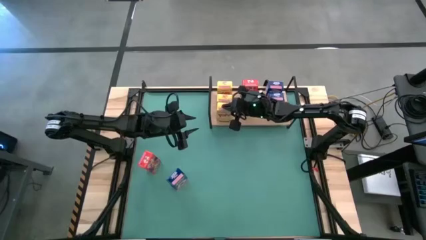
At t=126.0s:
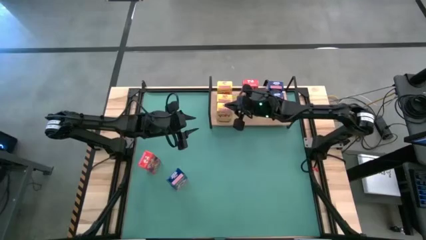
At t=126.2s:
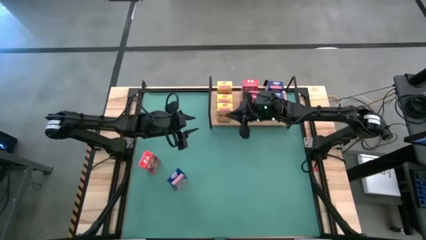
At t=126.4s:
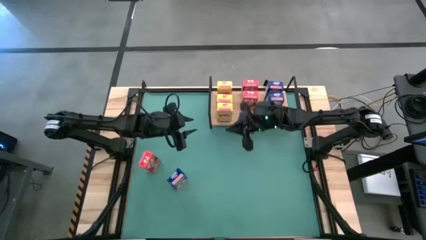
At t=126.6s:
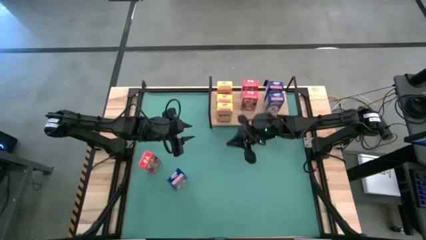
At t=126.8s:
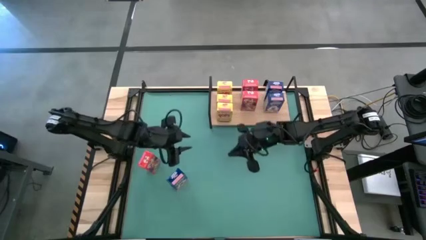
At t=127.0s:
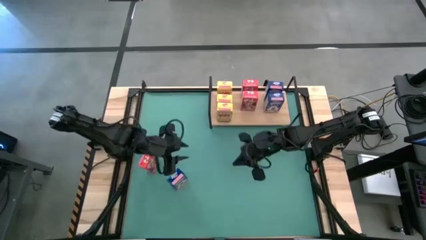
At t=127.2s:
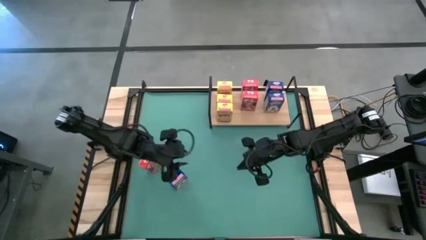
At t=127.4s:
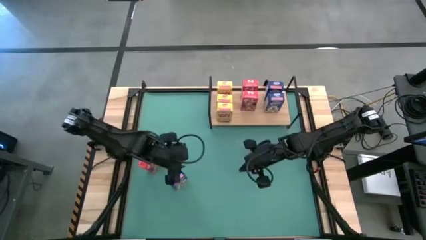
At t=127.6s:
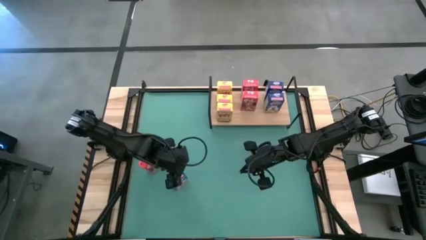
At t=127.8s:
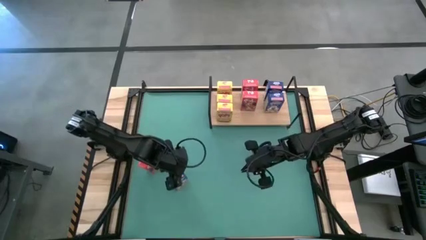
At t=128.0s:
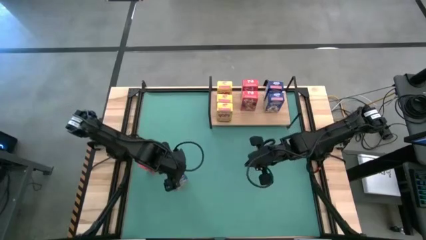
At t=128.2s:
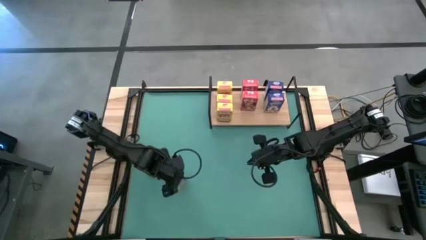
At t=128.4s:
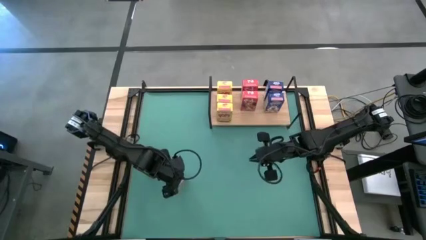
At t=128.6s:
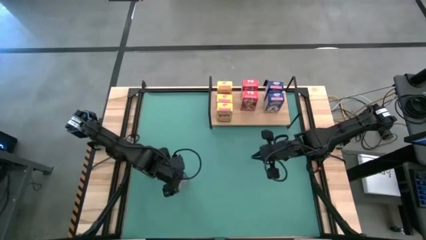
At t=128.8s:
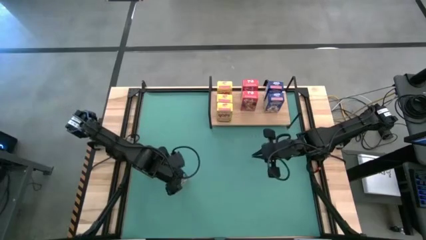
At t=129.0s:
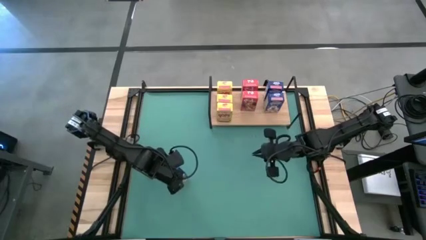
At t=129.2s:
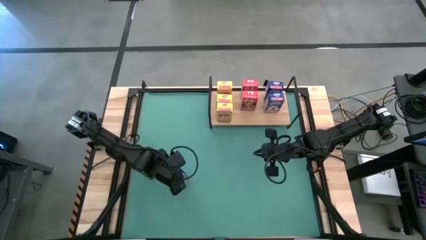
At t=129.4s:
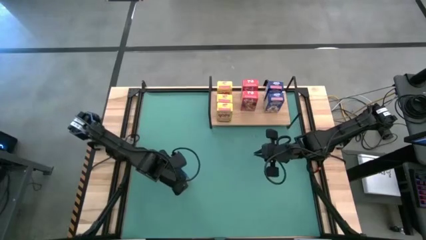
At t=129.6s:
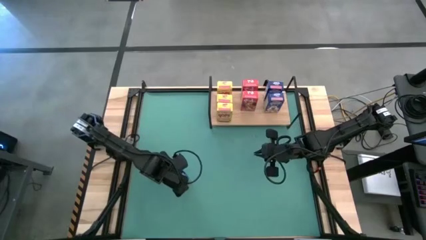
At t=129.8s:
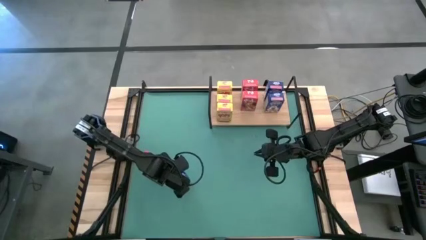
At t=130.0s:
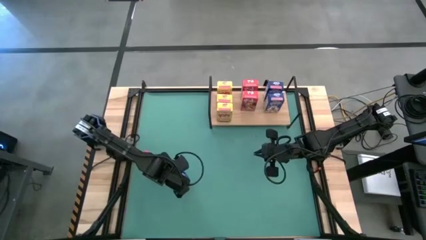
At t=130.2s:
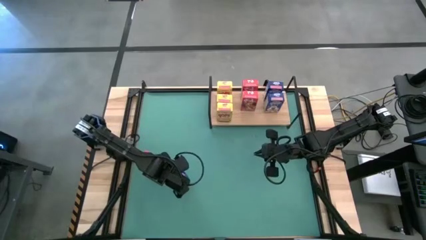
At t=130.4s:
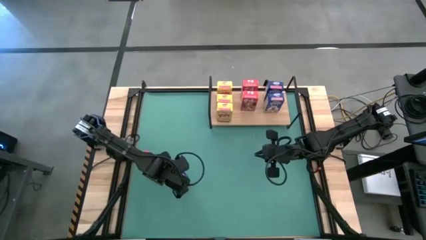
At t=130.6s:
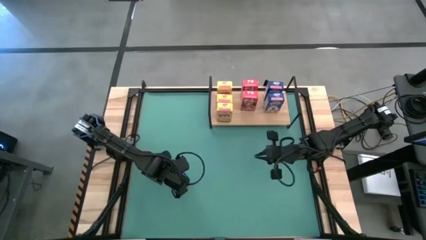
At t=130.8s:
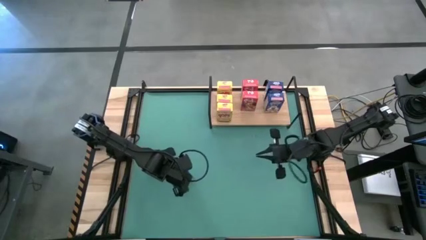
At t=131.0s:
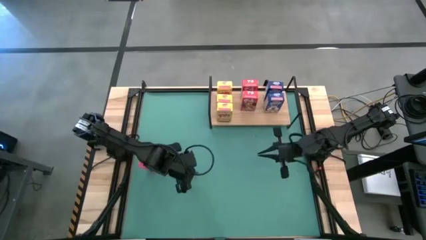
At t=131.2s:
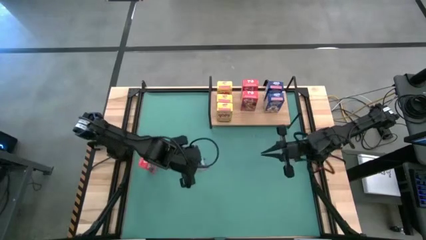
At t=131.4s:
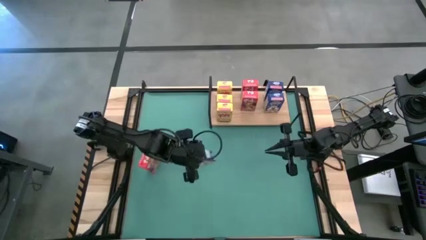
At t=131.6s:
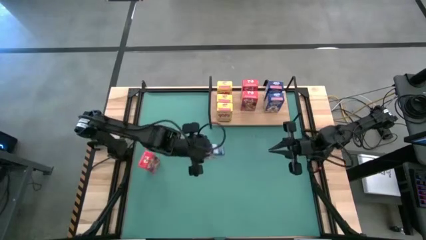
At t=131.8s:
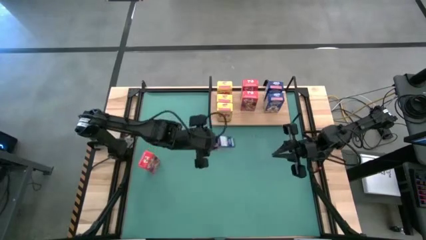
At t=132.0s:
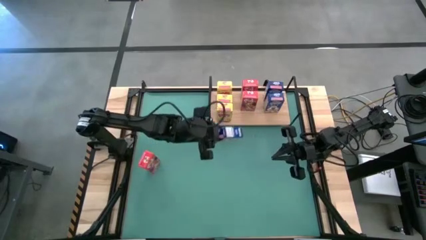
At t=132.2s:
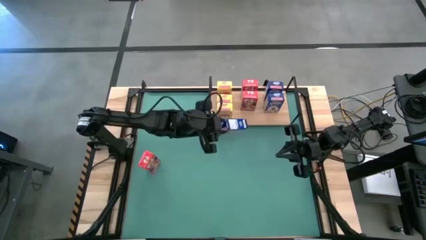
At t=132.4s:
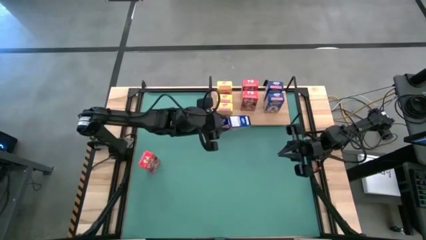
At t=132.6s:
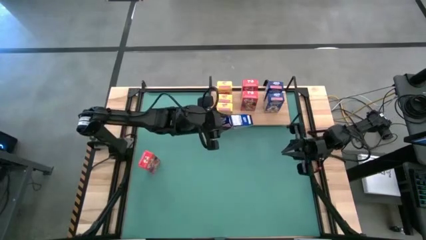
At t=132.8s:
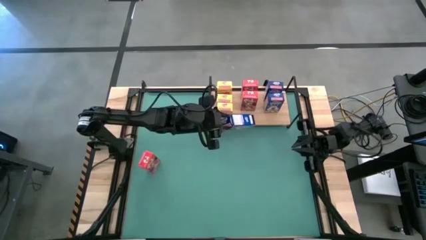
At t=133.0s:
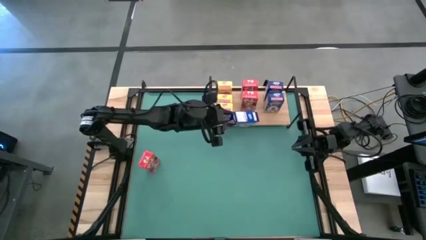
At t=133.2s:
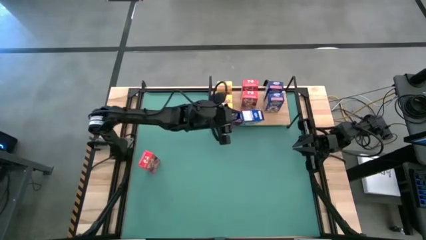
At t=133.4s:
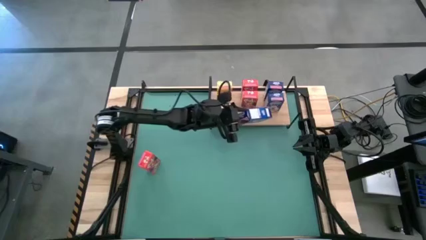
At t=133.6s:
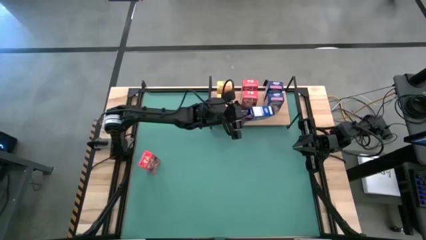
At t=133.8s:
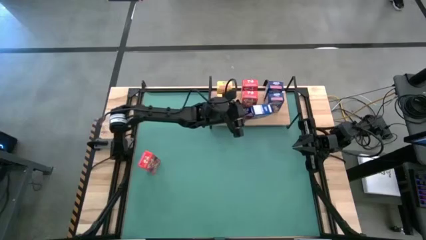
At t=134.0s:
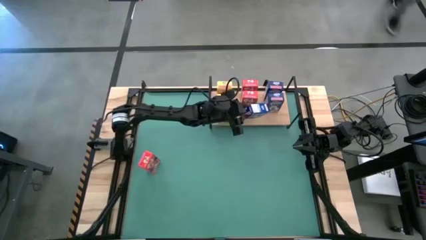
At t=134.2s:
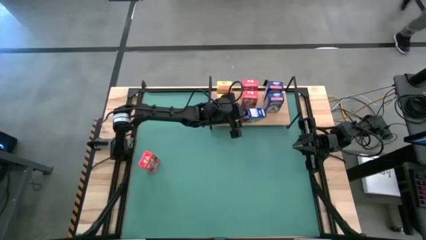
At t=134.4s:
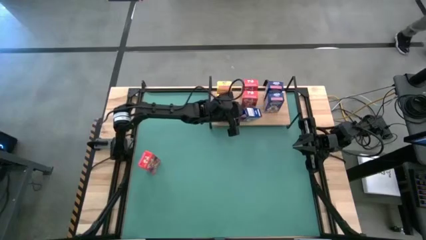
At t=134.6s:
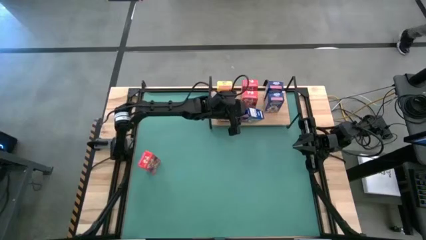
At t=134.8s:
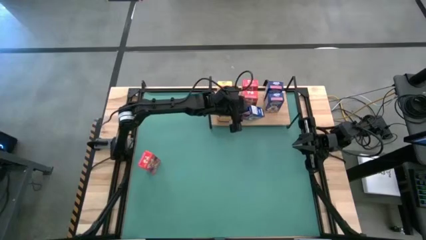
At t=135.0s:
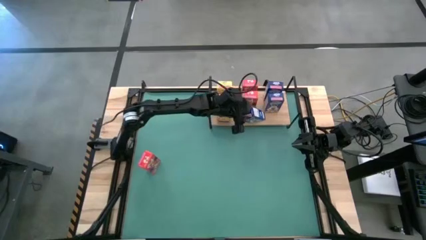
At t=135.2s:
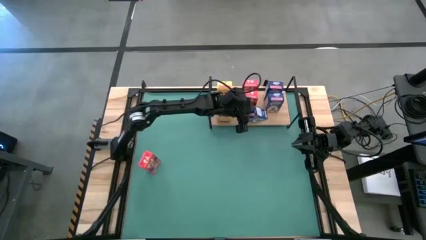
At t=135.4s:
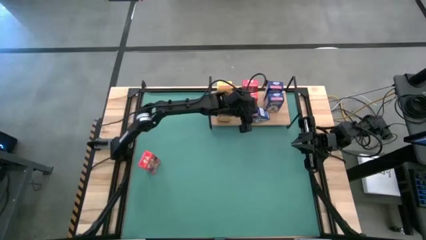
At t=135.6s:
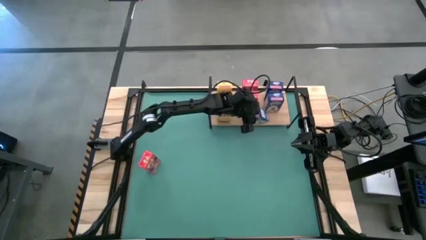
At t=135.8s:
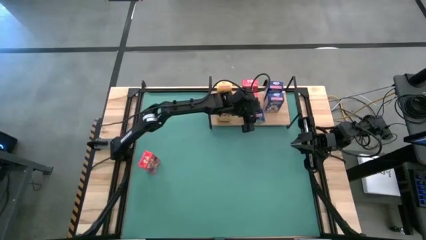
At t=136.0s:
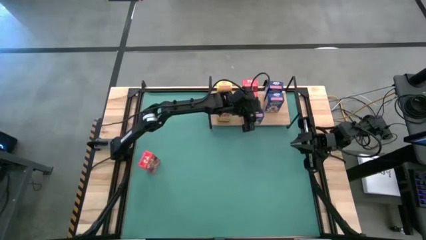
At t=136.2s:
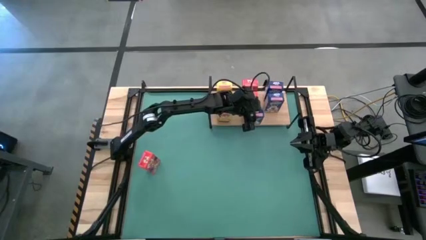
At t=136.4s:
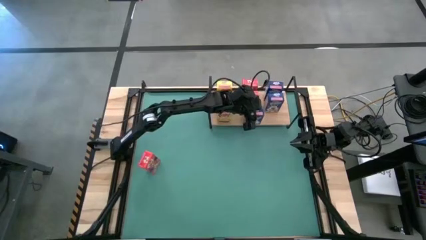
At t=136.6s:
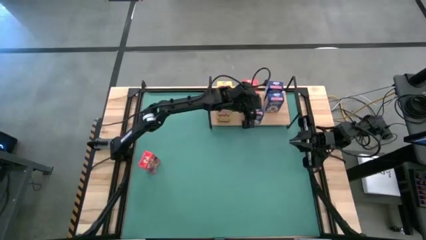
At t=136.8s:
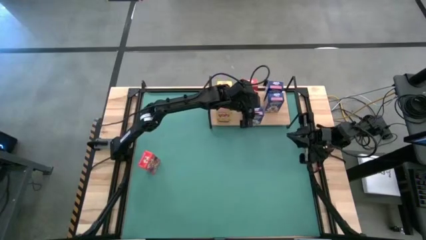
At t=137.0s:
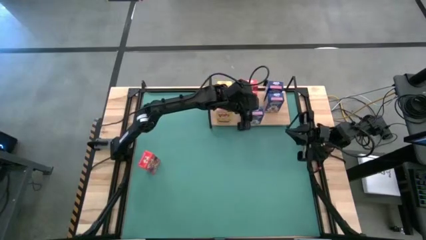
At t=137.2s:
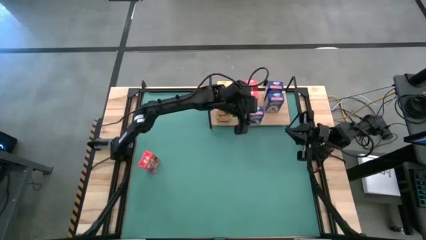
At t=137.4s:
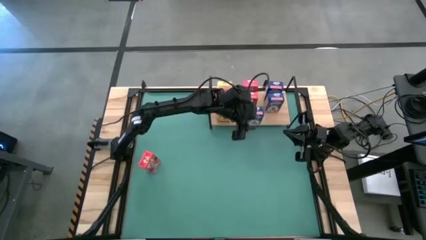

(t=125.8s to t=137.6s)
Task: Stack cereal on shelf
Put the blue cereal box on the shelf aligned with the other blue cereal boxes
